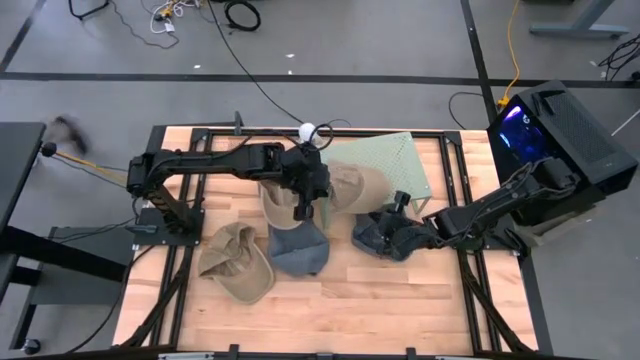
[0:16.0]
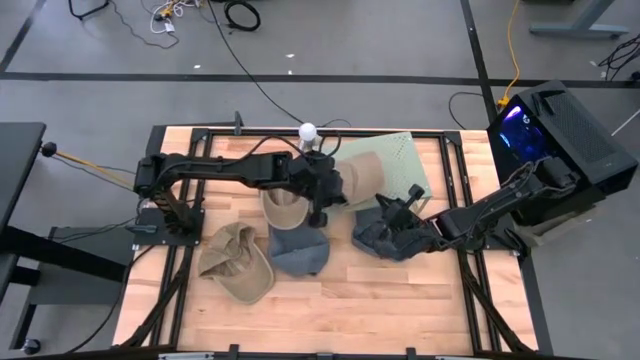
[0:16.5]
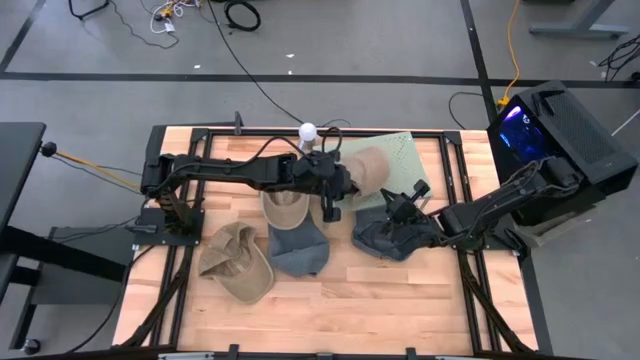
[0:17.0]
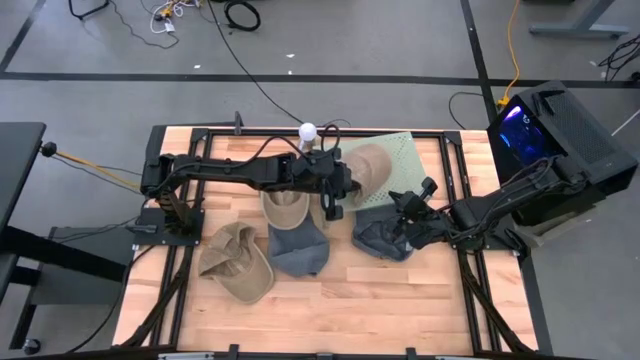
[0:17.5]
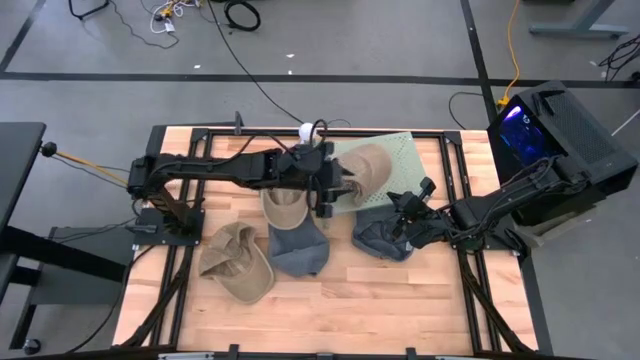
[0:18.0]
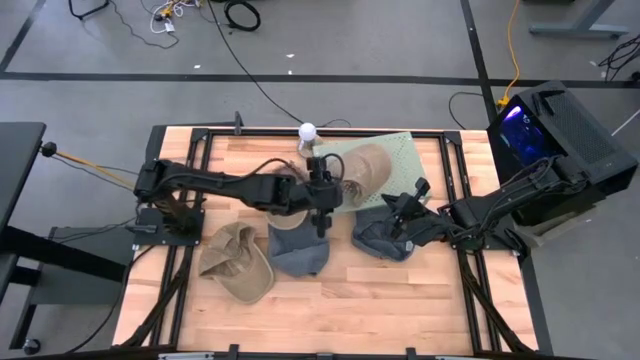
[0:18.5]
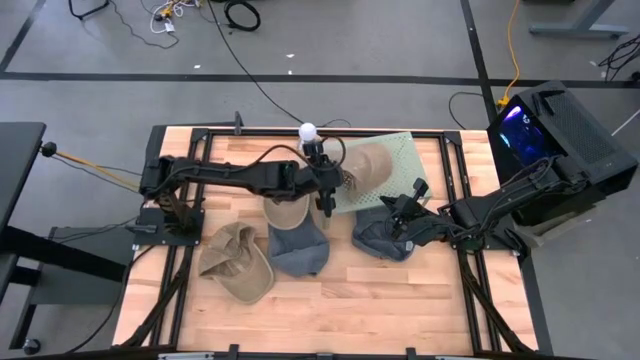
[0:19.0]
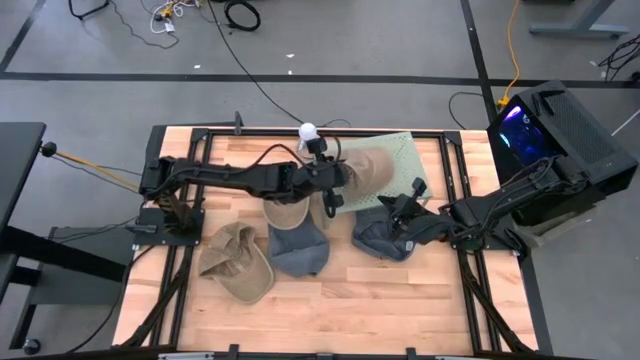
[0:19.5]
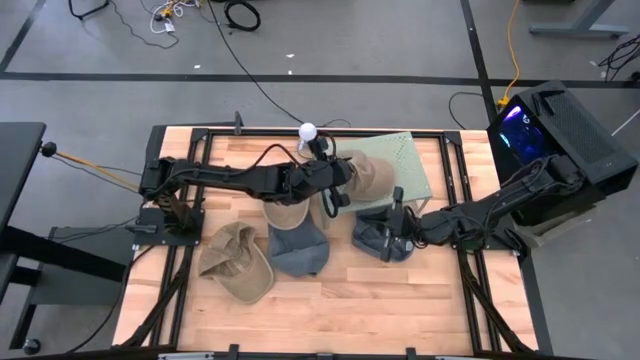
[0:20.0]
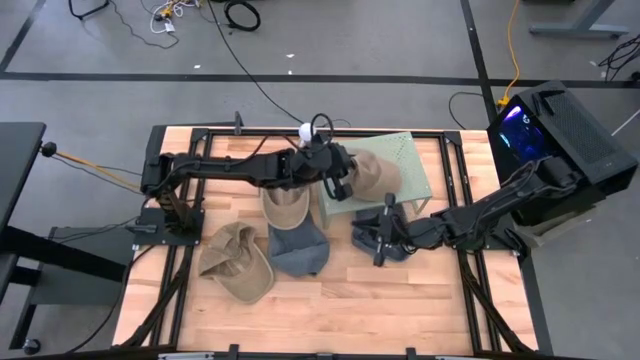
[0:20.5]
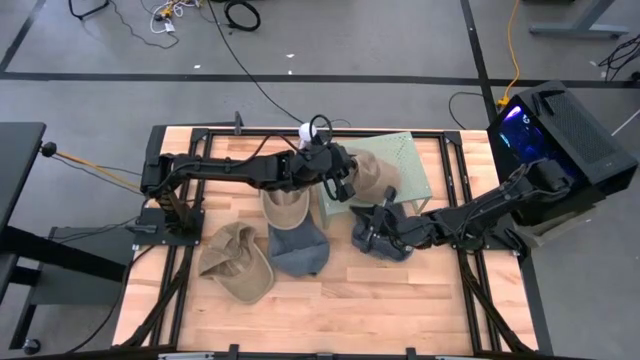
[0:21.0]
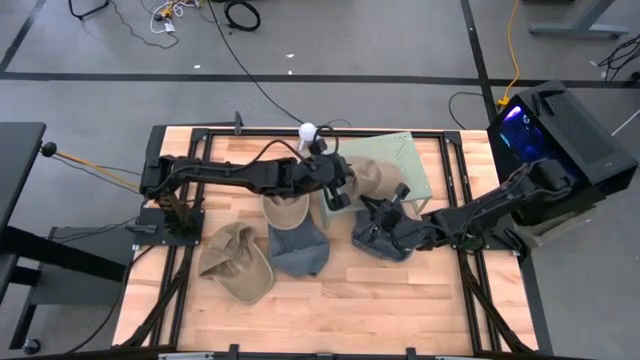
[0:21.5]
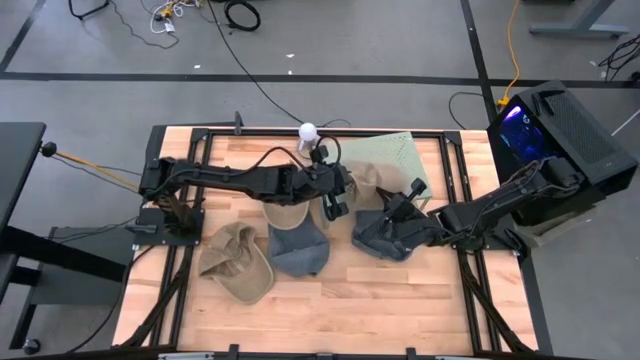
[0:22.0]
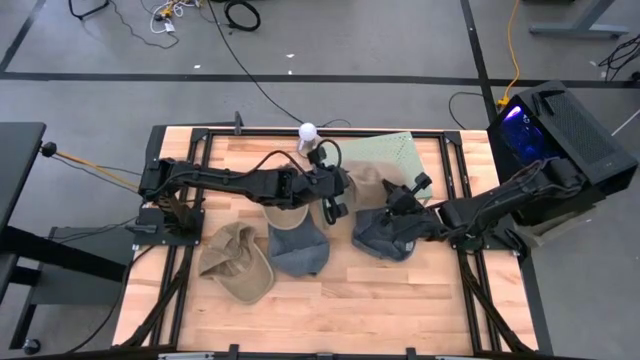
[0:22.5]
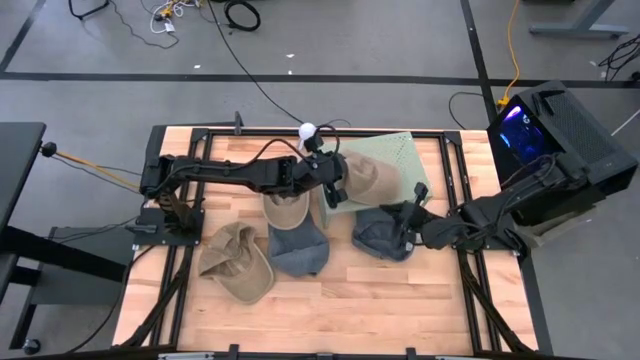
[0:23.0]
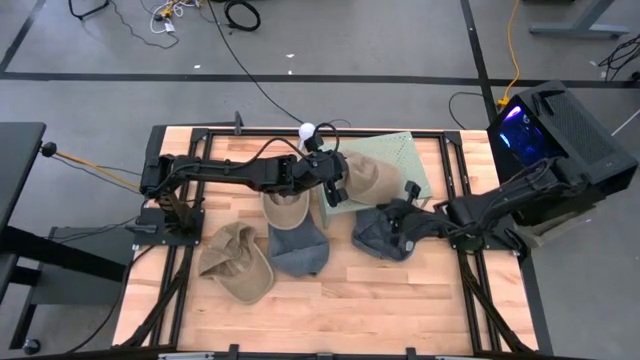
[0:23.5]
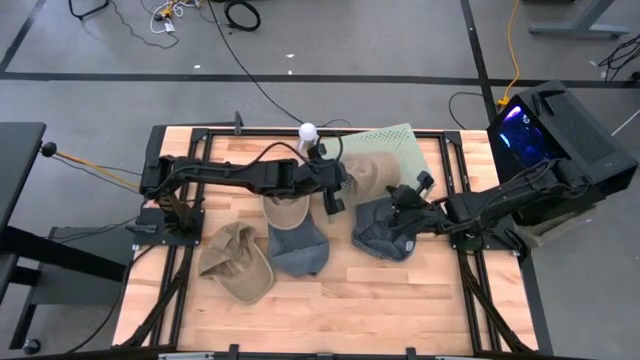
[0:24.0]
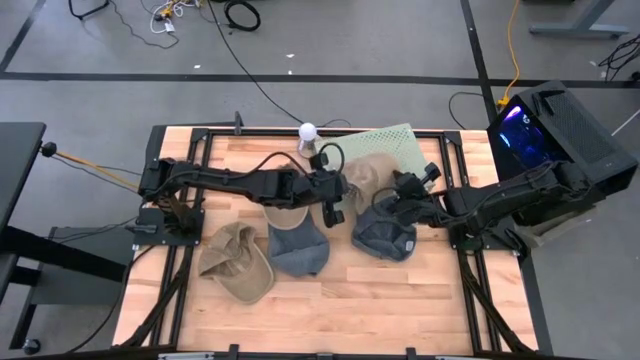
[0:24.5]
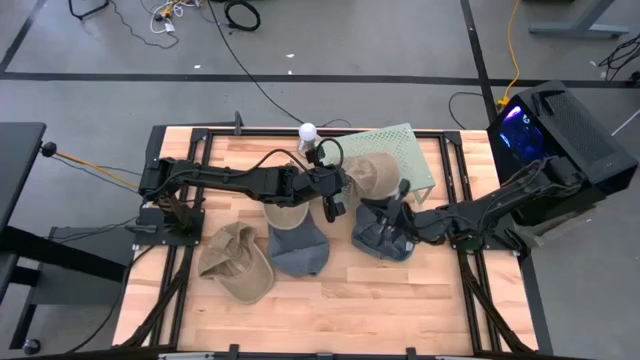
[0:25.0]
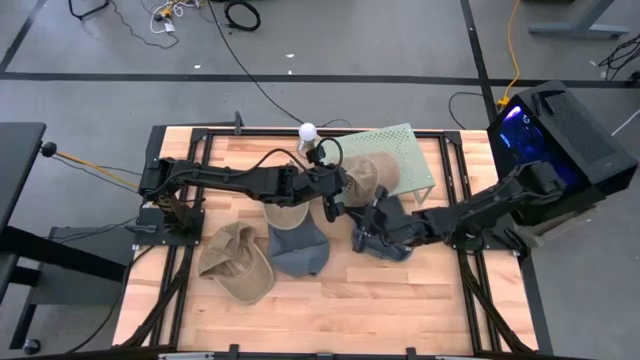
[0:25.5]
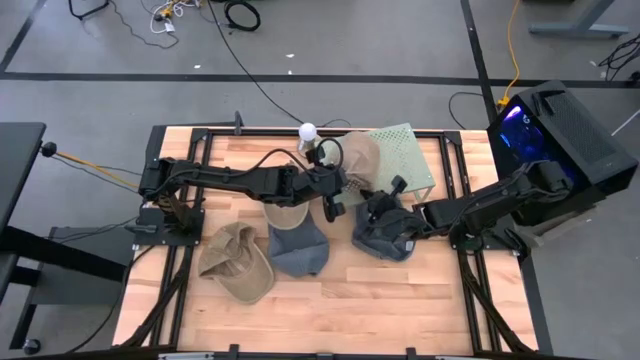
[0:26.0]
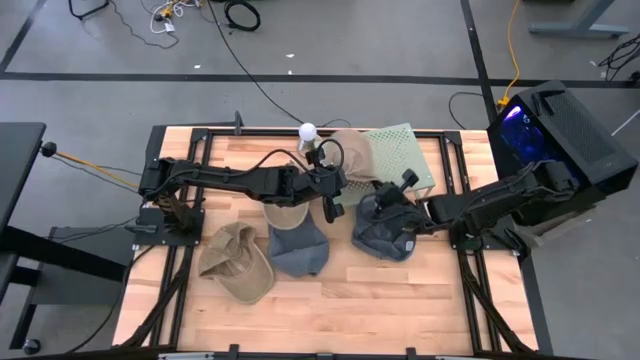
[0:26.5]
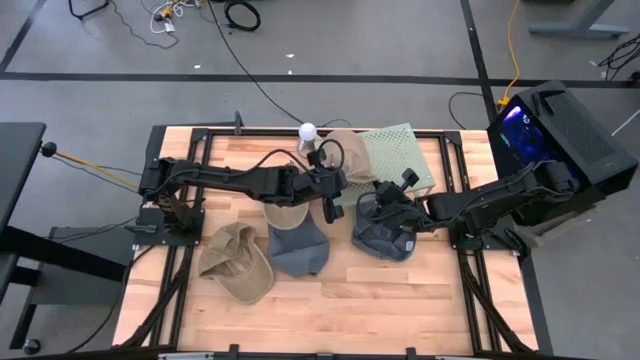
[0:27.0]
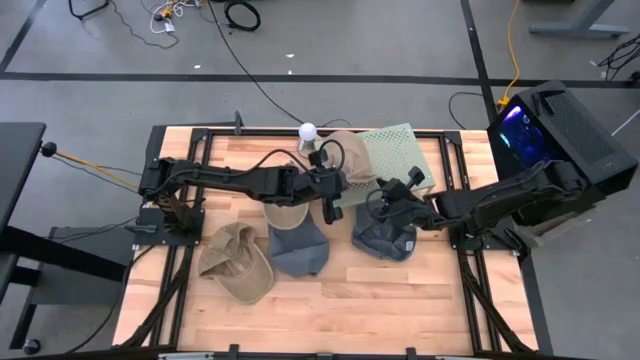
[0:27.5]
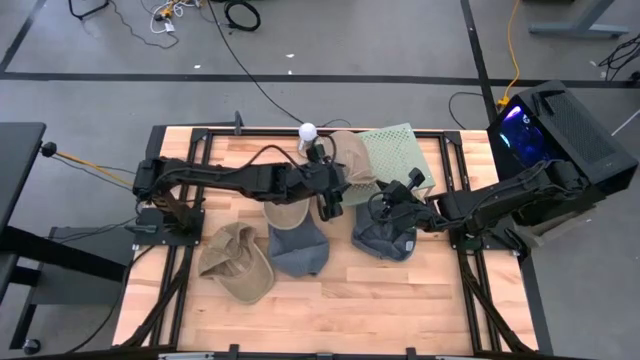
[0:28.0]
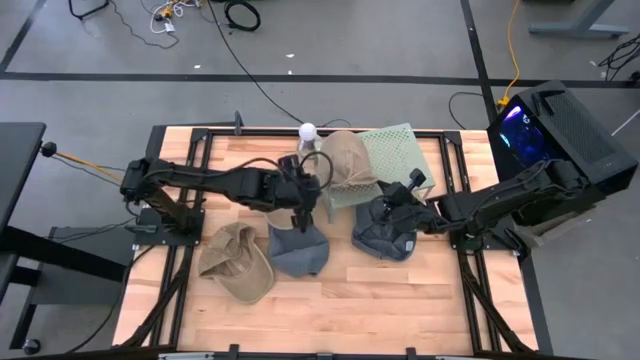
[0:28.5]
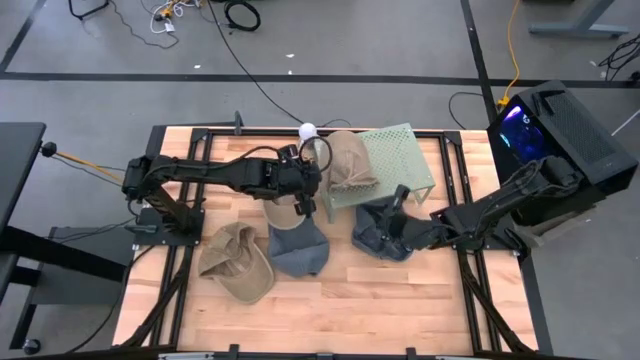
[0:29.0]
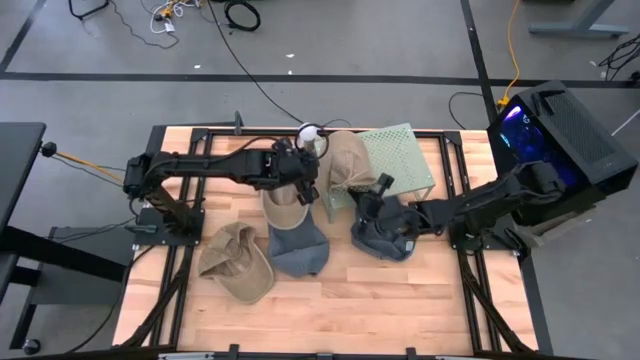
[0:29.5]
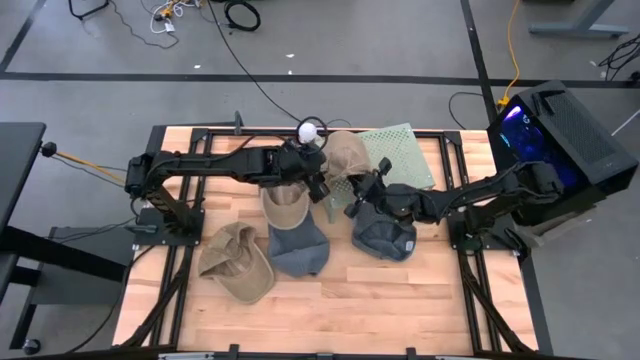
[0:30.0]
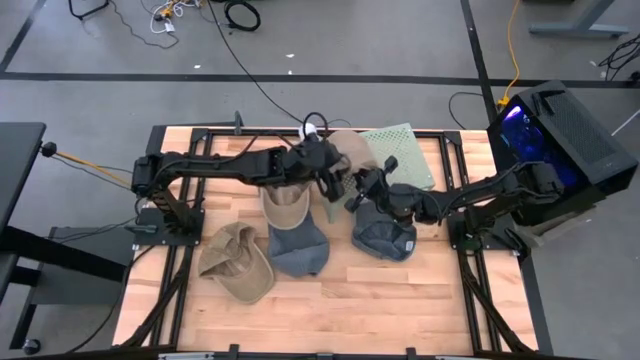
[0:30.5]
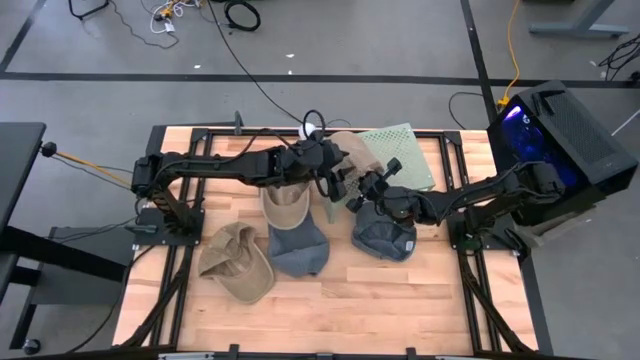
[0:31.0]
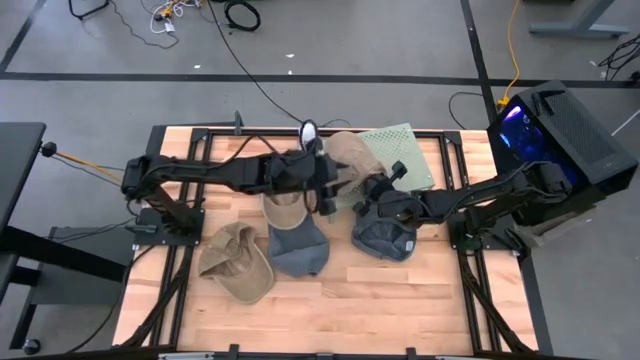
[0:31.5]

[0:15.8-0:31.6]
Task: Stack caps on shelf
Put the bottom right brown cap on the shelf

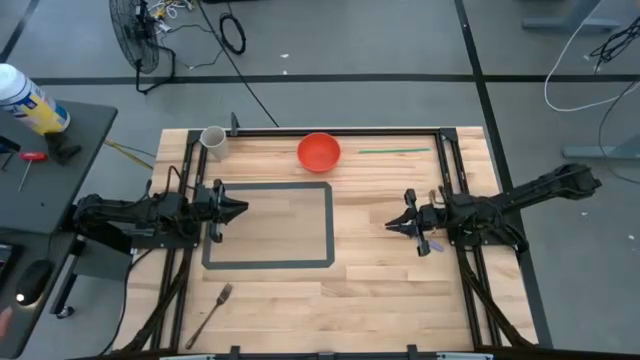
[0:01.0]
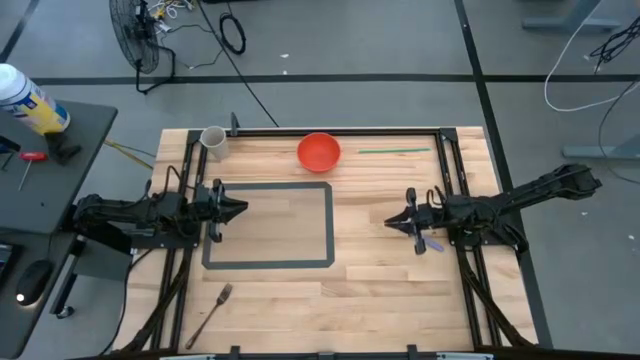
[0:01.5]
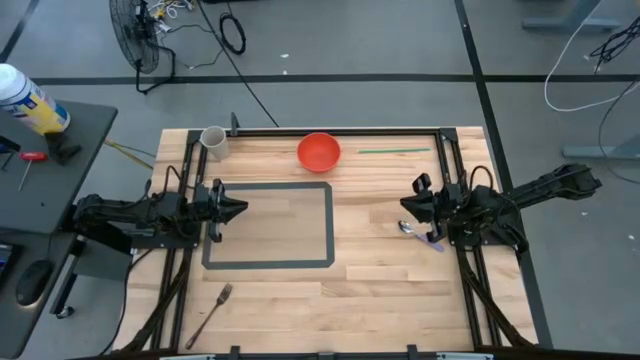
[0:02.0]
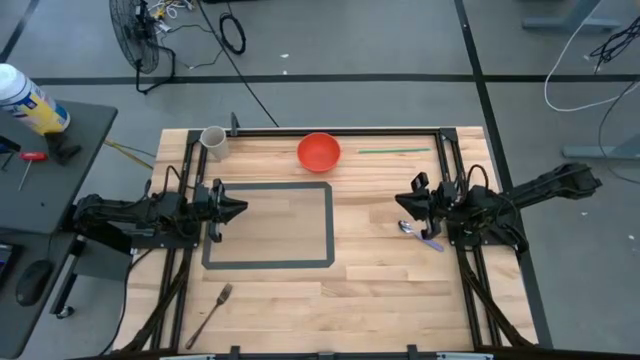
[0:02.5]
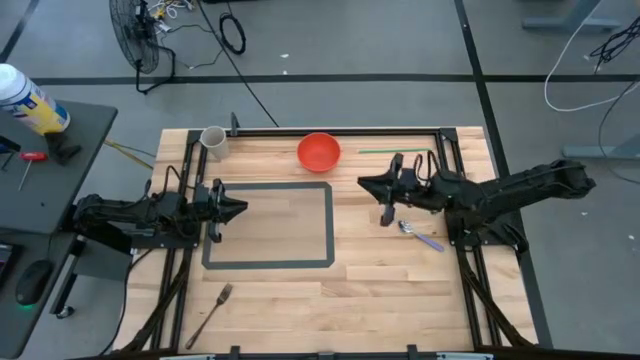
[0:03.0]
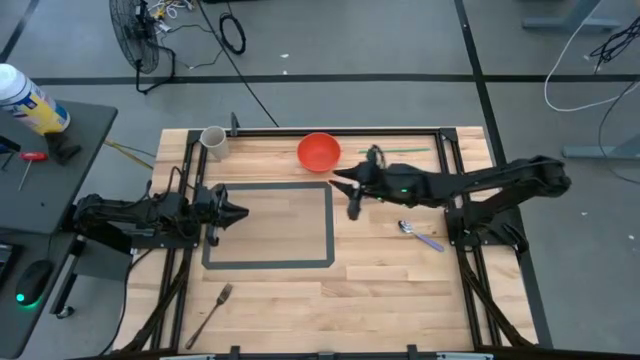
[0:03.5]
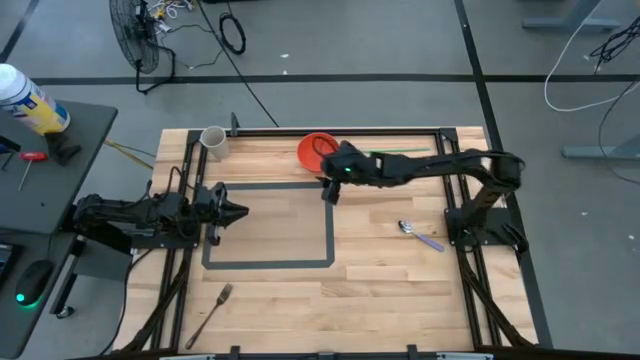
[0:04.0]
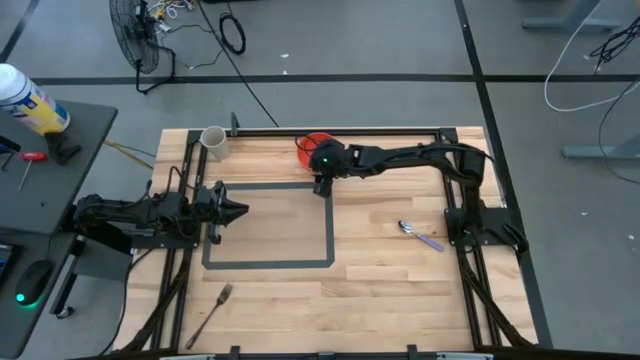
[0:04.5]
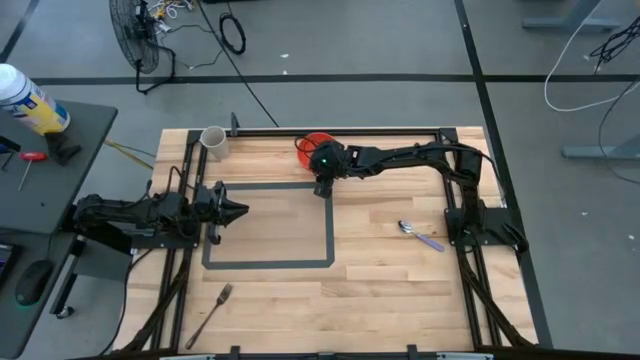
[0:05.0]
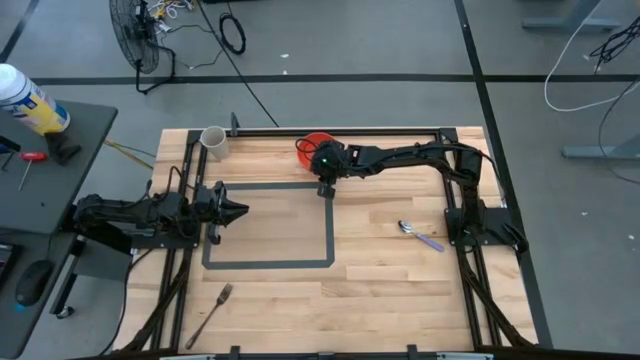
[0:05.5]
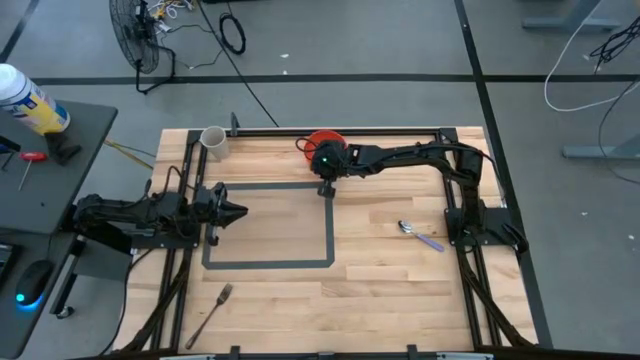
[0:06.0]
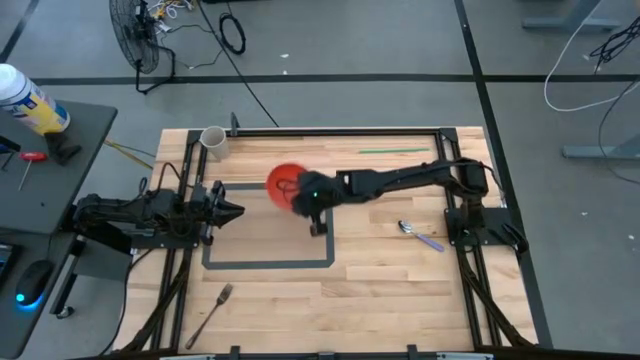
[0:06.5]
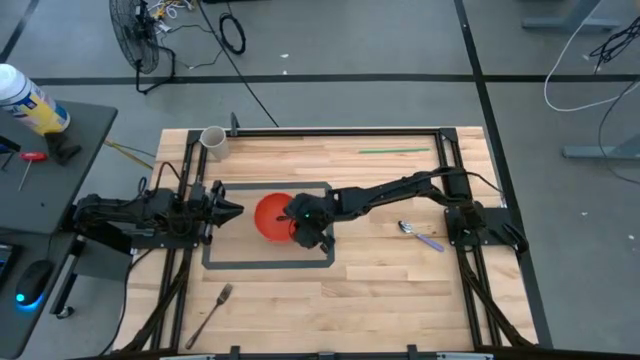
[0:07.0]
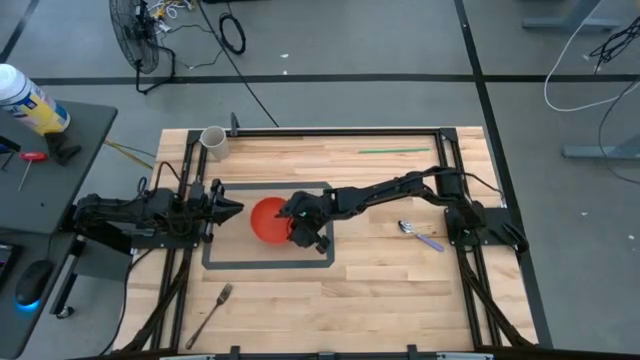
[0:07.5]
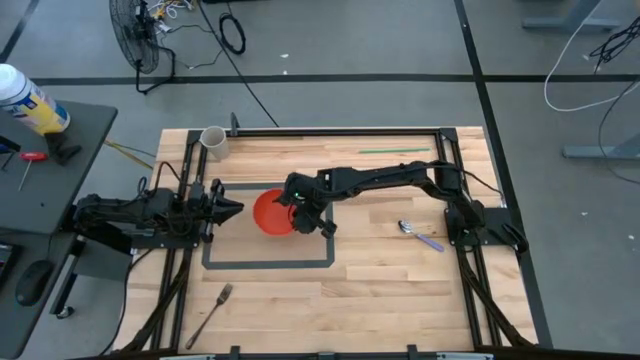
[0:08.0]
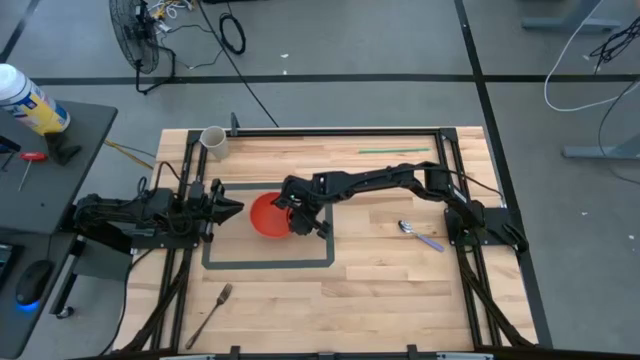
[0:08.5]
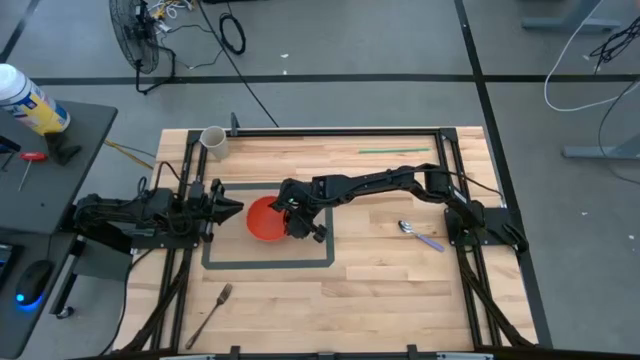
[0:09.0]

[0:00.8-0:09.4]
Task: Pick & Place Utensil
Put the orange bowl on the transparent mat
